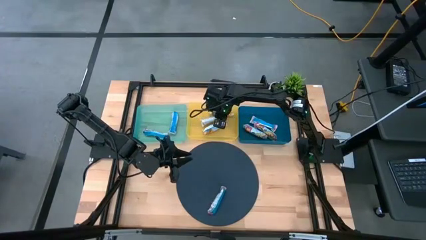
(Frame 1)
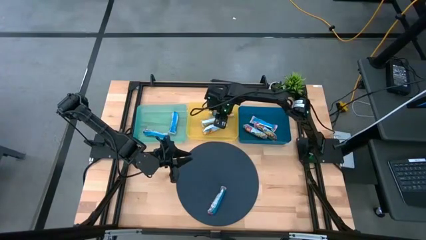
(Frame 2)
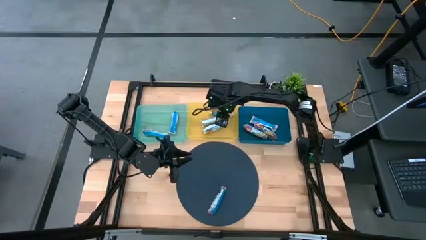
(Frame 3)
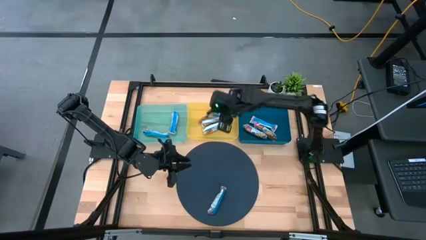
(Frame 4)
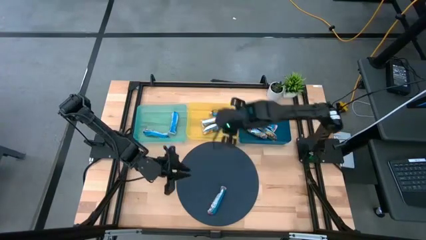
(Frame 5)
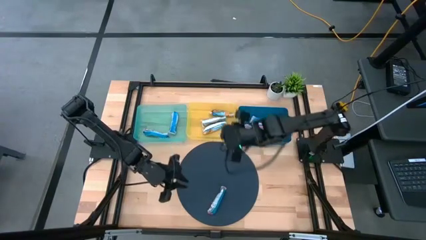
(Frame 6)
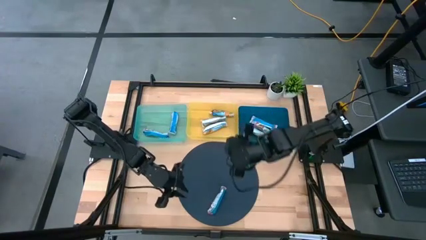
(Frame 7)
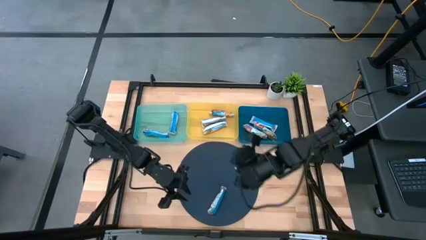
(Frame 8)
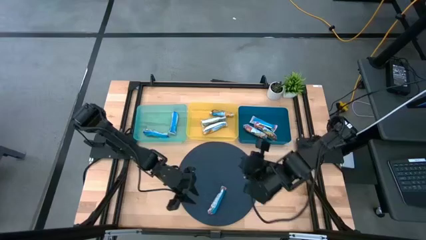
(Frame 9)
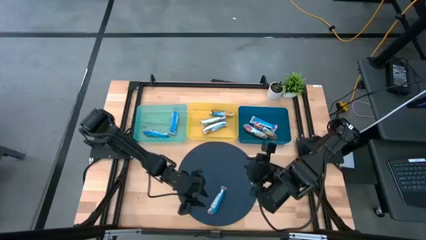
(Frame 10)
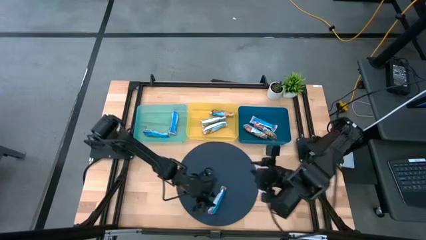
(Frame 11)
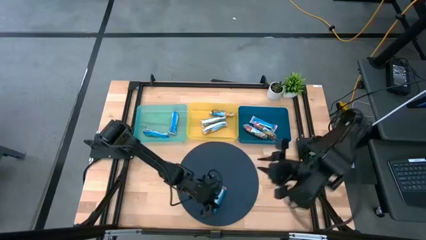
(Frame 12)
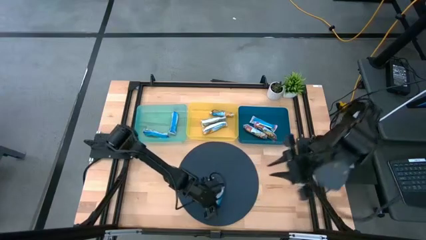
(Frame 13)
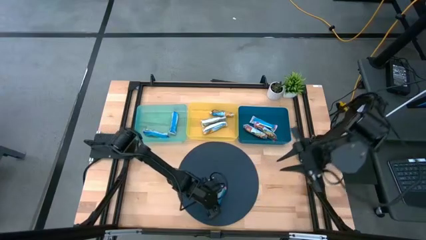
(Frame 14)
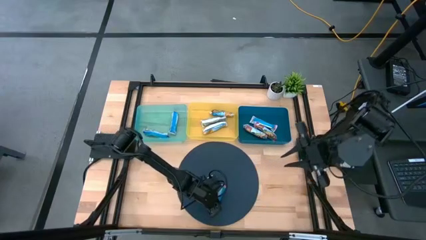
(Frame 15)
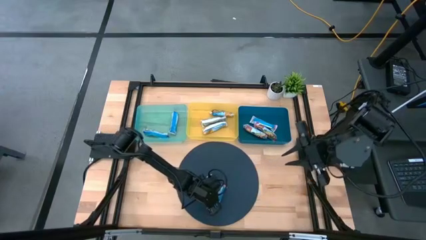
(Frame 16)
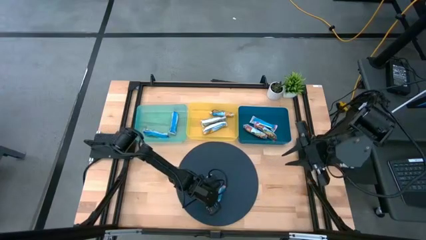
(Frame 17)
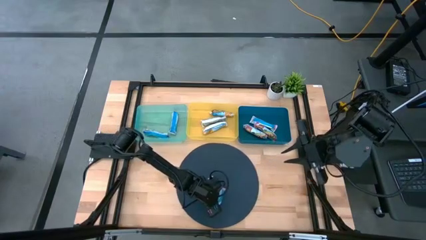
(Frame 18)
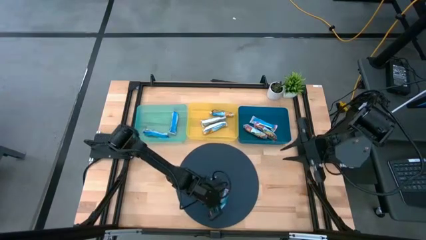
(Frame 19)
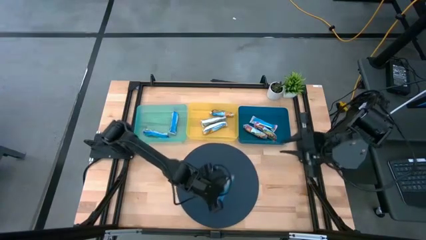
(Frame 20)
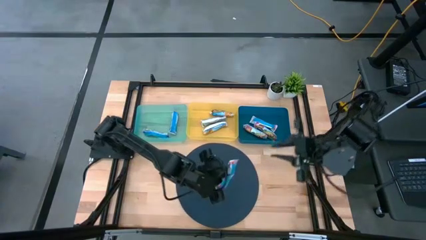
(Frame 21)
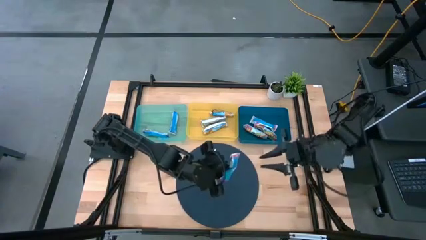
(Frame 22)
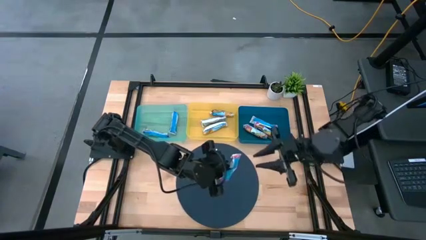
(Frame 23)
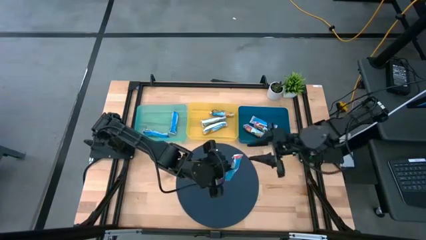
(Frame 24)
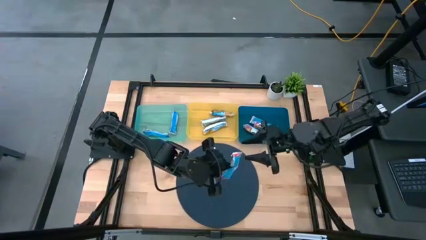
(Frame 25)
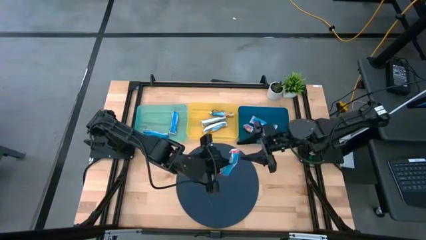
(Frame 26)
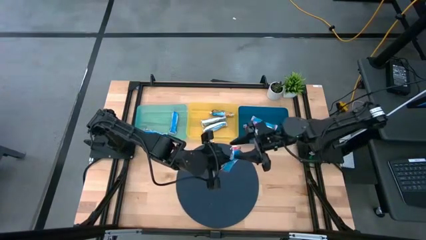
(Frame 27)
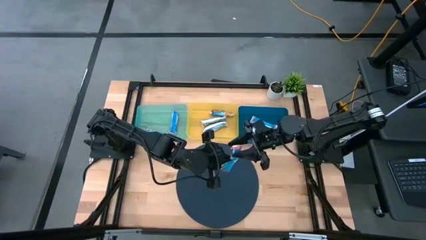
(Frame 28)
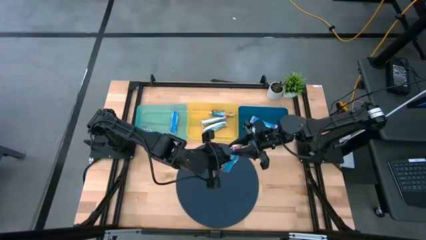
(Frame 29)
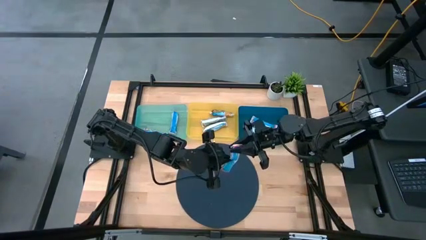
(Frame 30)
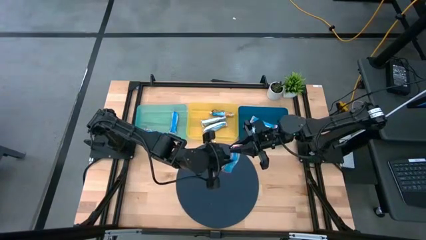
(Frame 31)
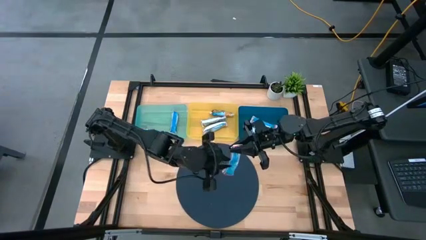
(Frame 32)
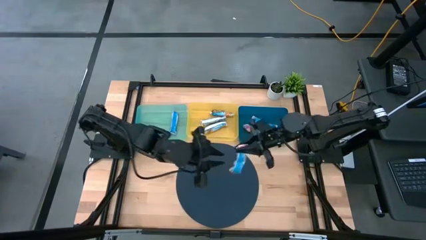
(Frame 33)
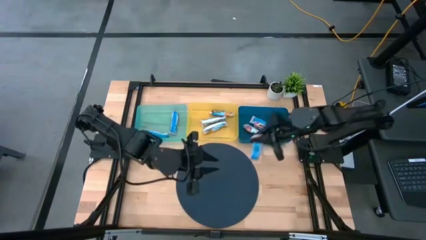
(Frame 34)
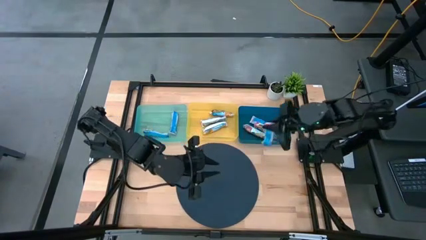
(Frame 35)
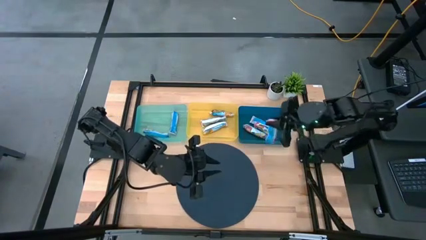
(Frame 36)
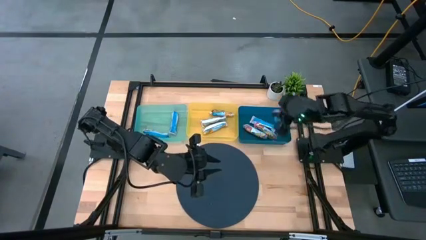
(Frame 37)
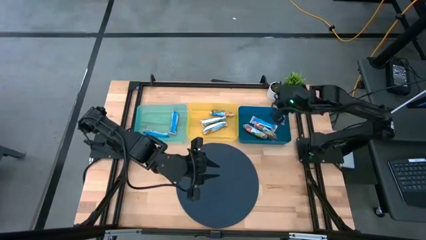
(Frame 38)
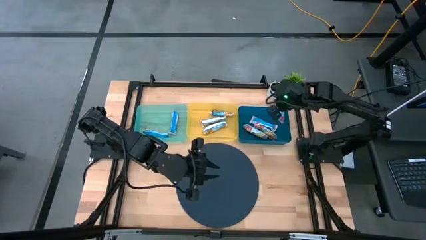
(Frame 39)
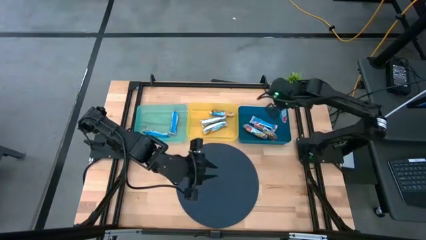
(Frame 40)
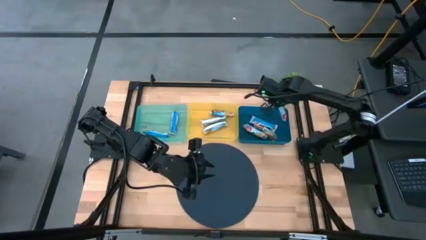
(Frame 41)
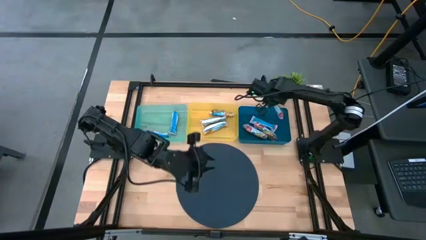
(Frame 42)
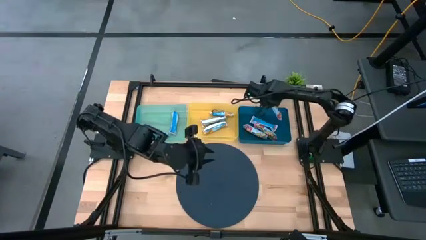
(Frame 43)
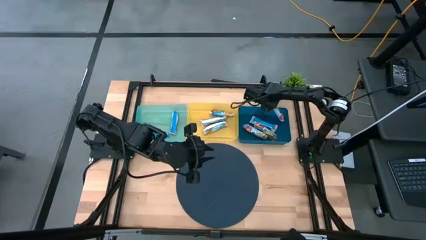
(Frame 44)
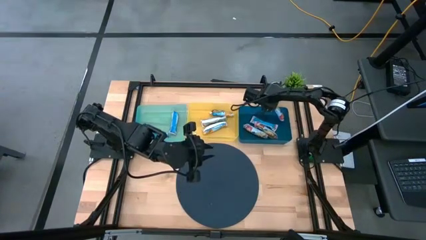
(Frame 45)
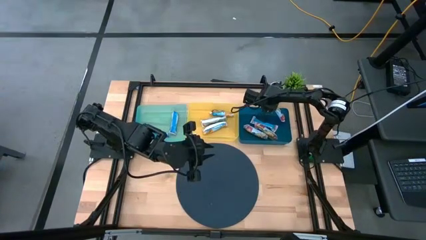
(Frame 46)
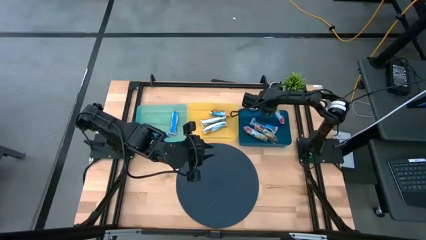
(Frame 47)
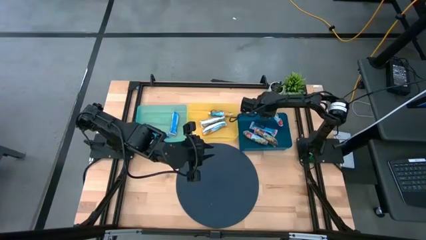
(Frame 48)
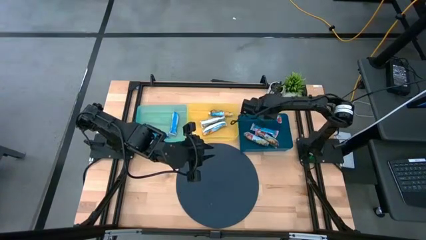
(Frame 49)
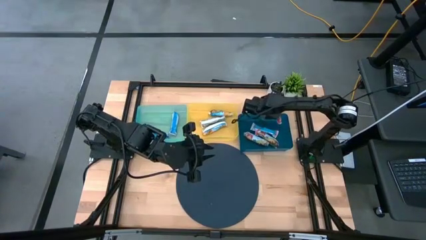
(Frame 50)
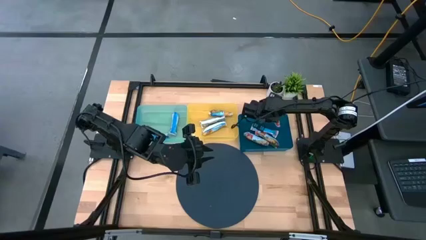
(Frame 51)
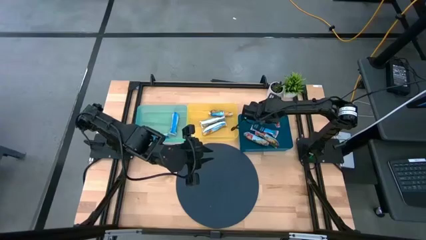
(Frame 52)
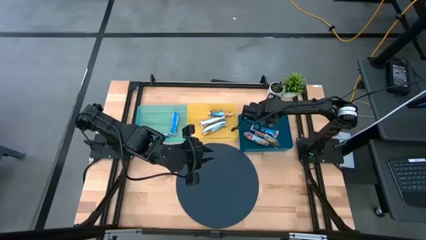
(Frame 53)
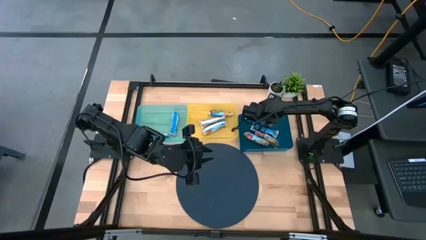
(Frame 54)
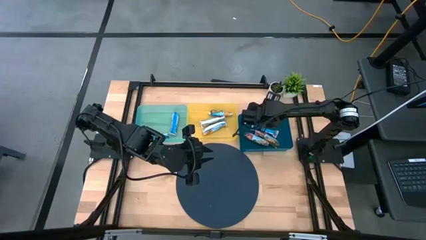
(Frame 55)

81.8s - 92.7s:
Task: Pick and place Granola Bars by type
Put the red granola bar into the blue bin
